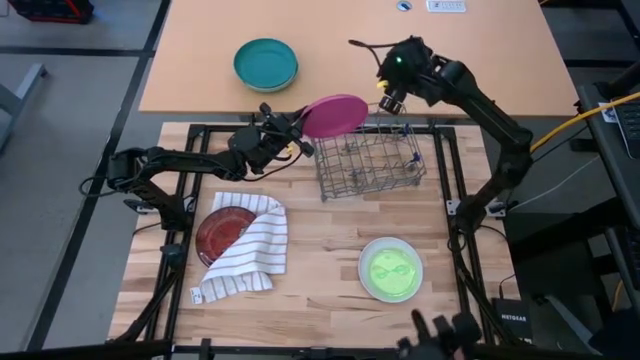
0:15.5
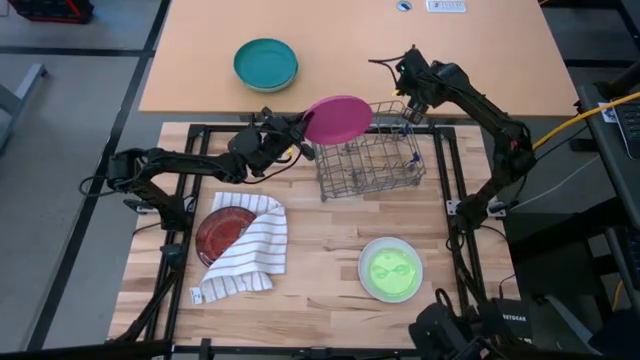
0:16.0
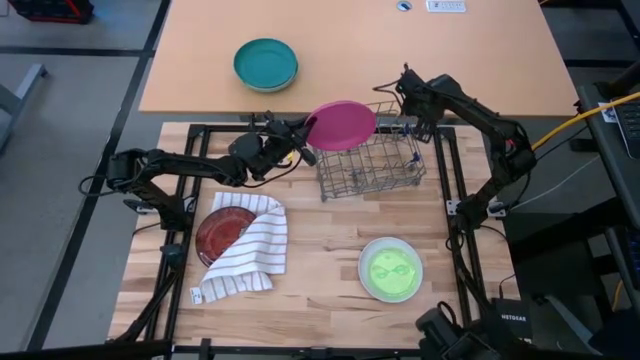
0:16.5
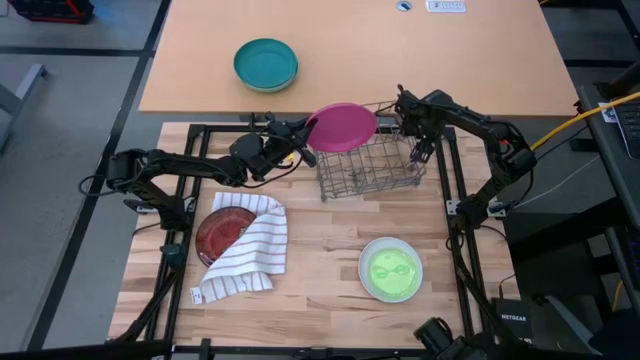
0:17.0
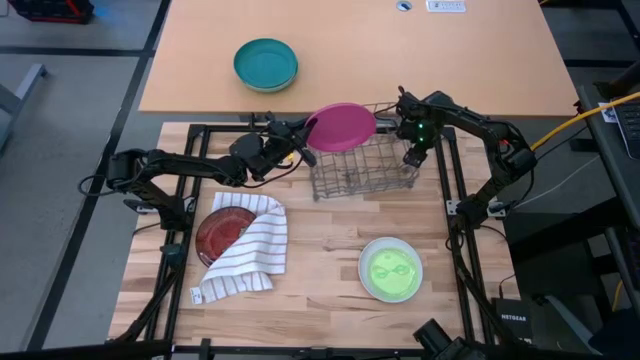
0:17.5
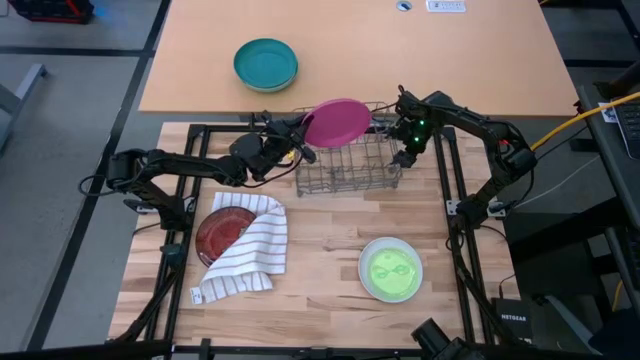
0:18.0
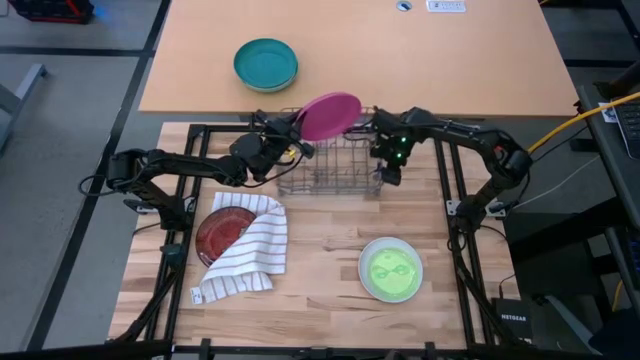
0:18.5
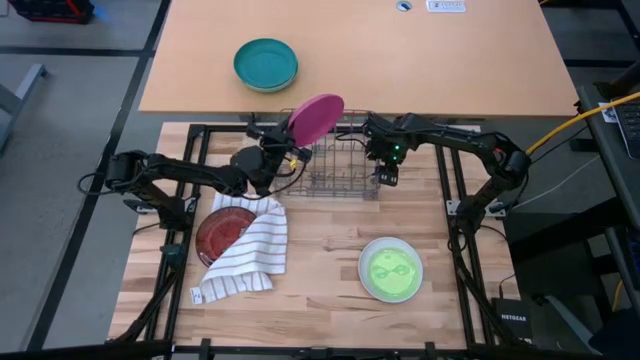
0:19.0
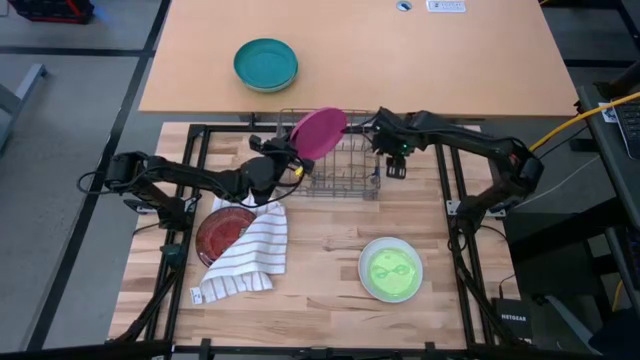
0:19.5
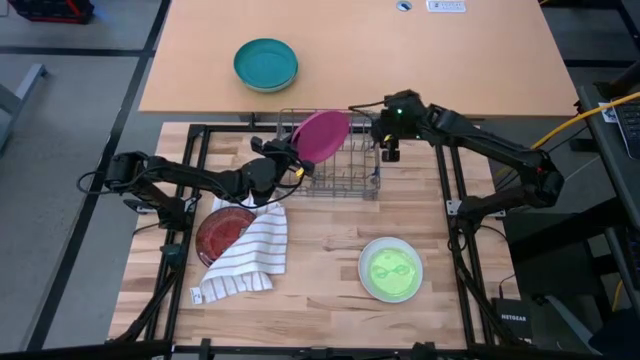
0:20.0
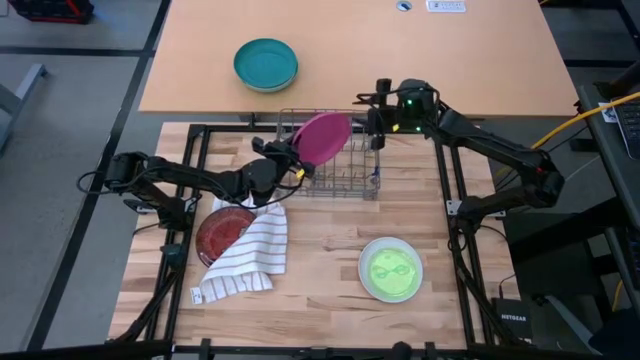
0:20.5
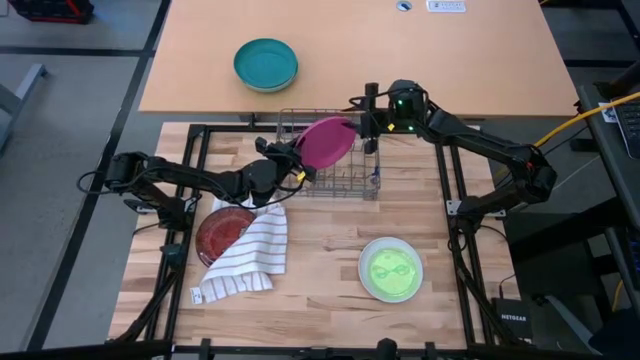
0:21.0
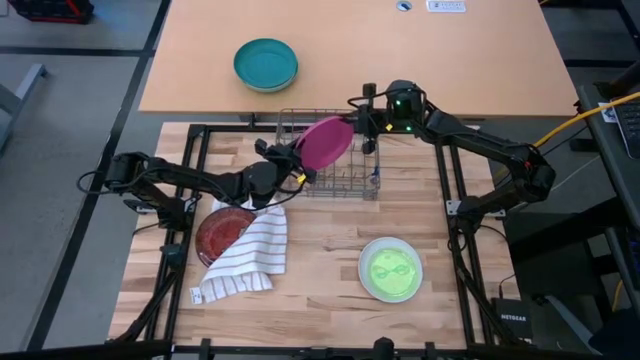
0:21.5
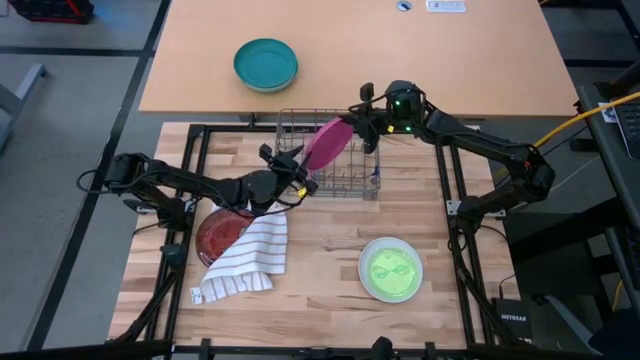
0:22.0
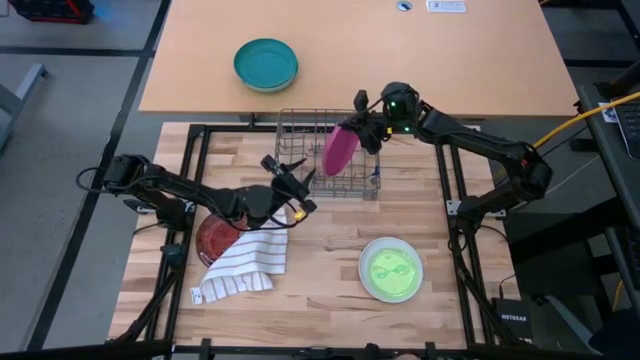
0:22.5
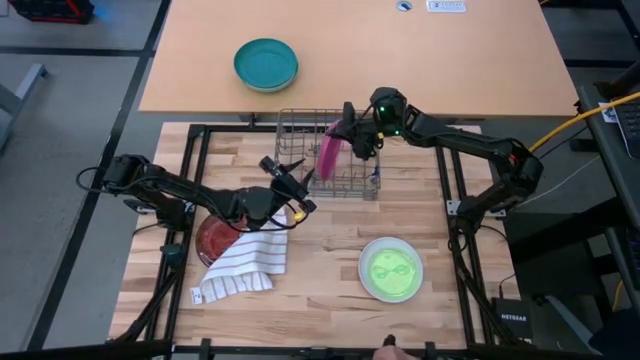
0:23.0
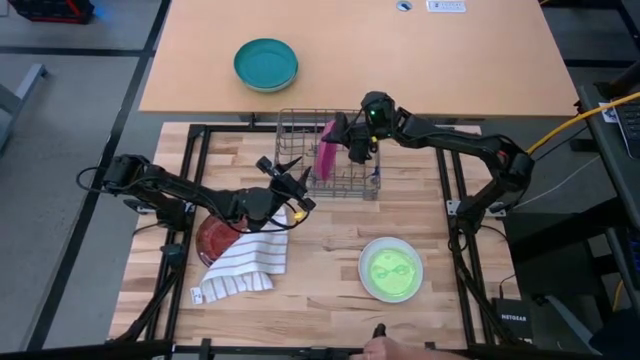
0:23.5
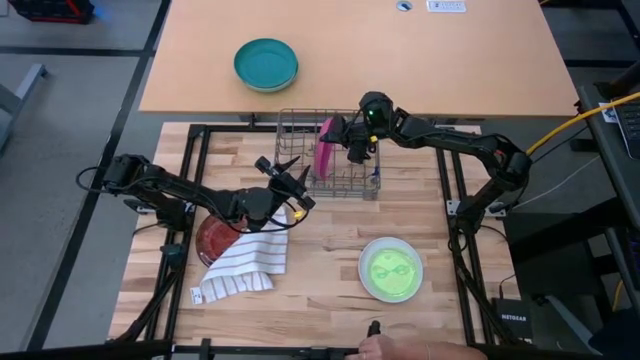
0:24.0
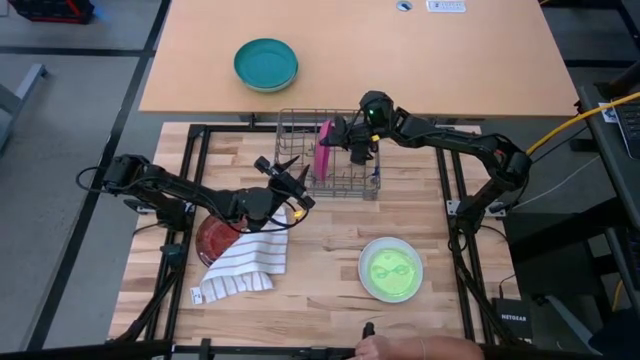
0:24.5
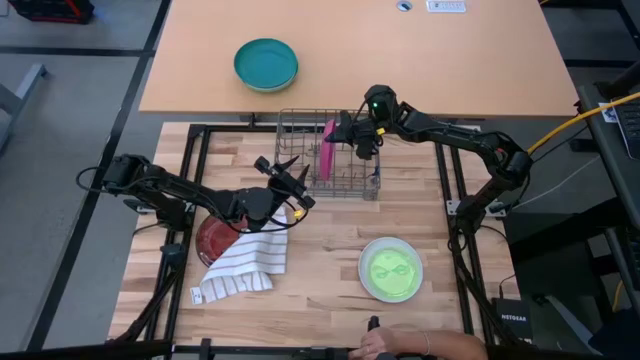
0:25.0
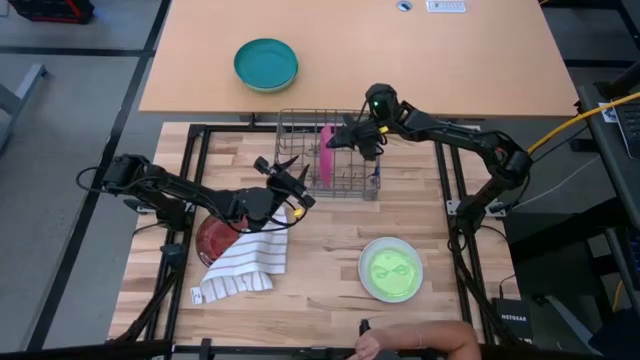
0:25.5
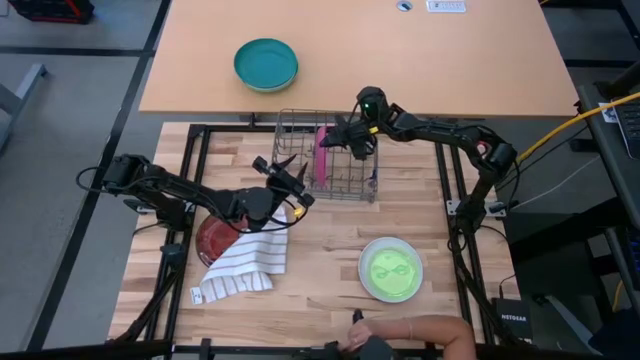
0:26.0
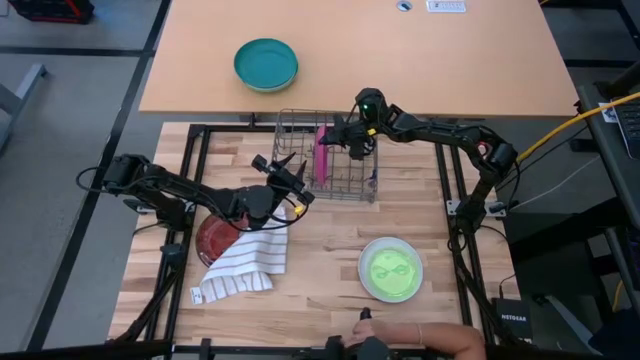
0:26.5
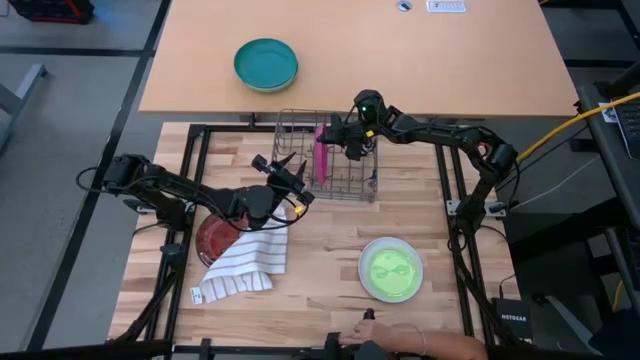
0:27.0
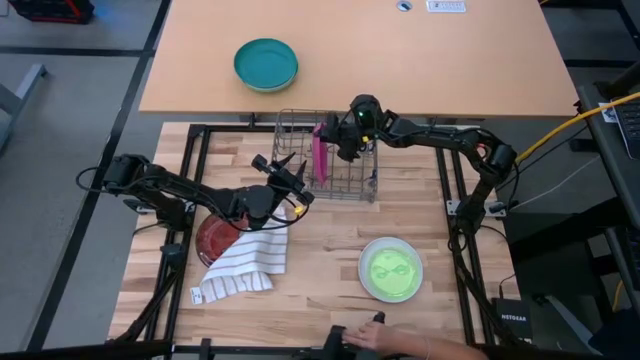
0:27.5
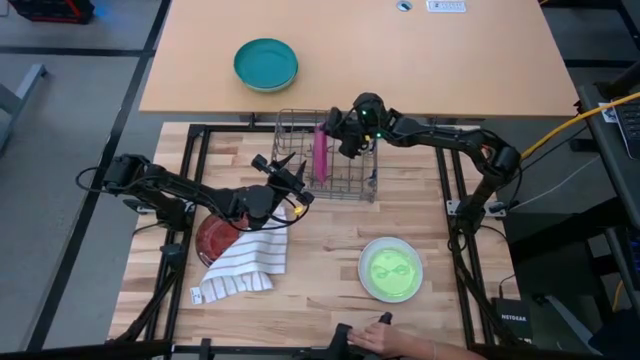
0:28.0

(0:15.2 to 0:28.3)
Task: Sort dishes
Put the pink plate in the dish rack

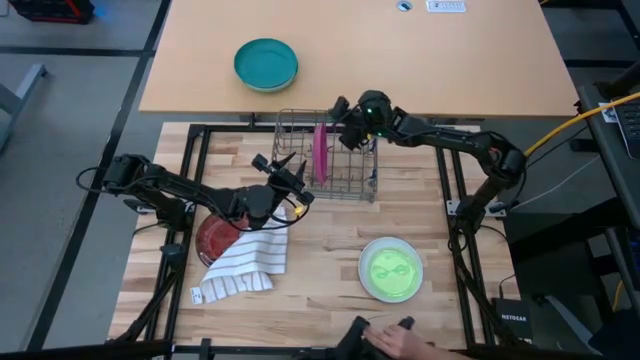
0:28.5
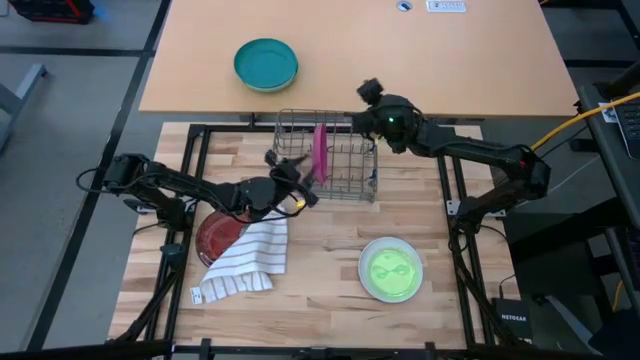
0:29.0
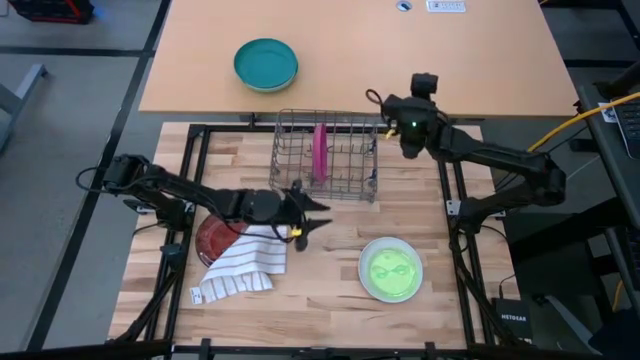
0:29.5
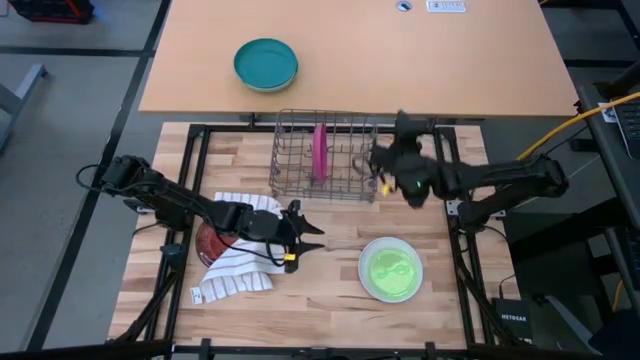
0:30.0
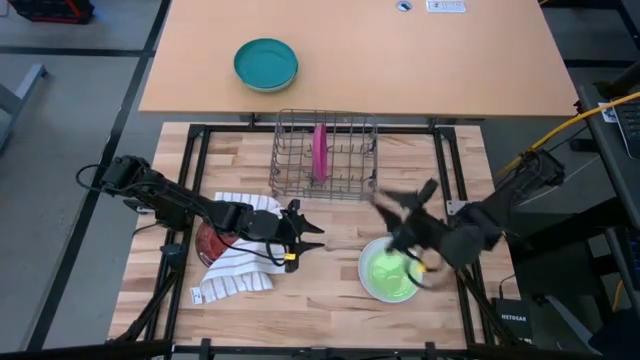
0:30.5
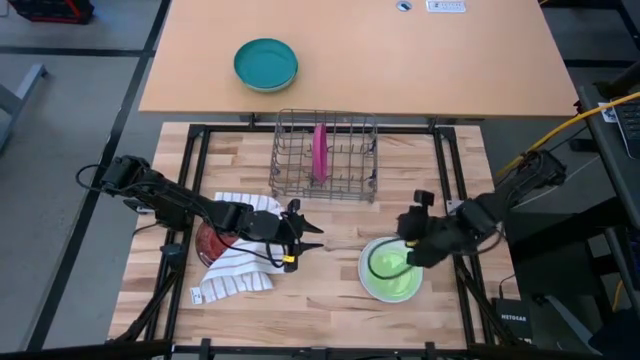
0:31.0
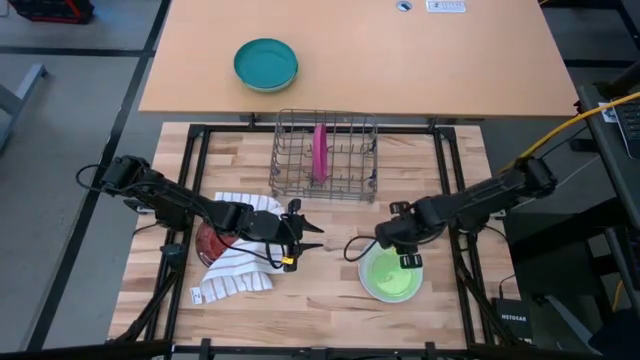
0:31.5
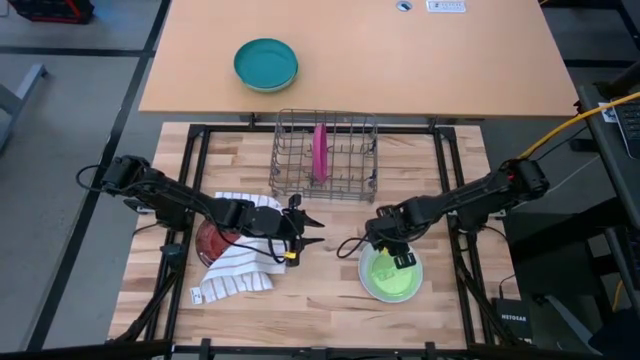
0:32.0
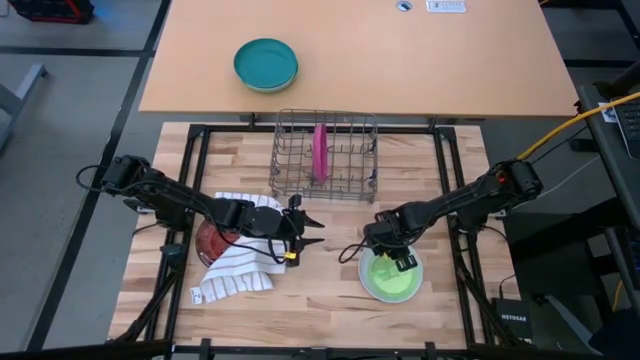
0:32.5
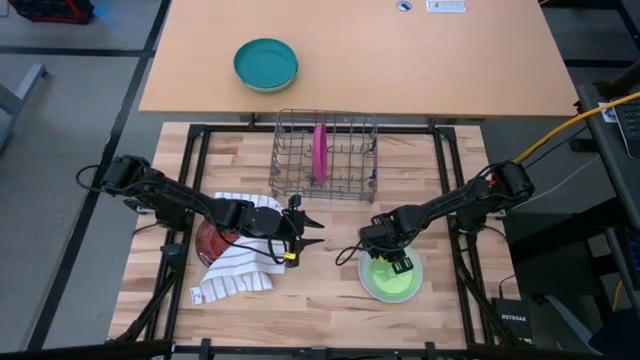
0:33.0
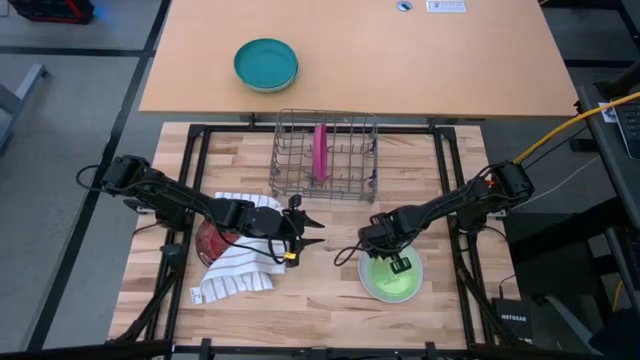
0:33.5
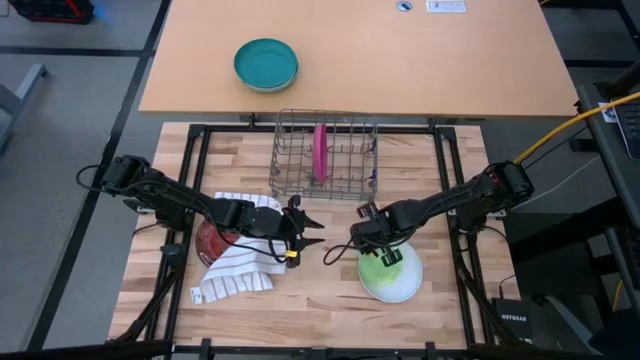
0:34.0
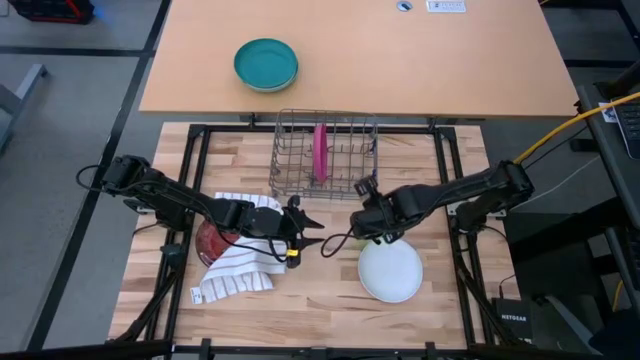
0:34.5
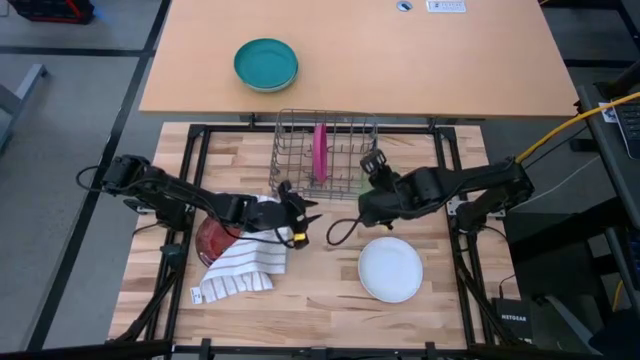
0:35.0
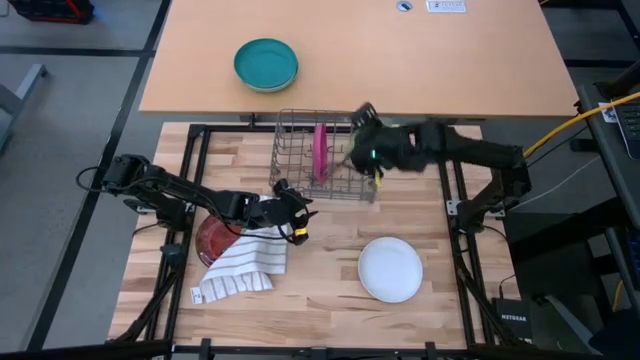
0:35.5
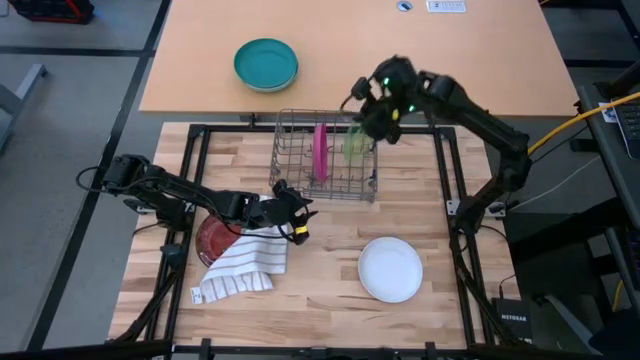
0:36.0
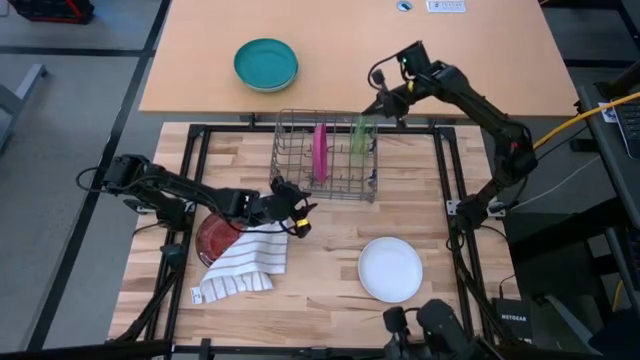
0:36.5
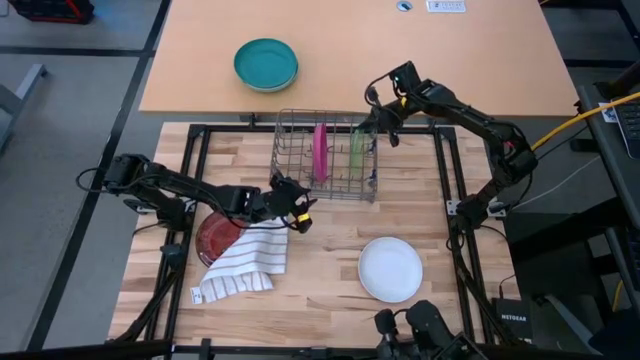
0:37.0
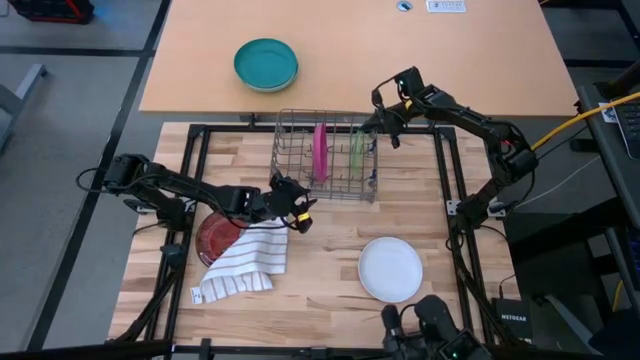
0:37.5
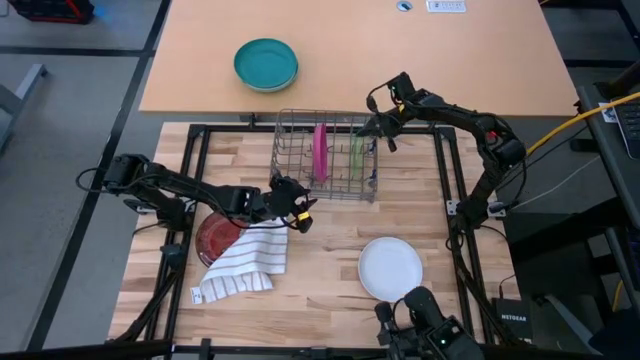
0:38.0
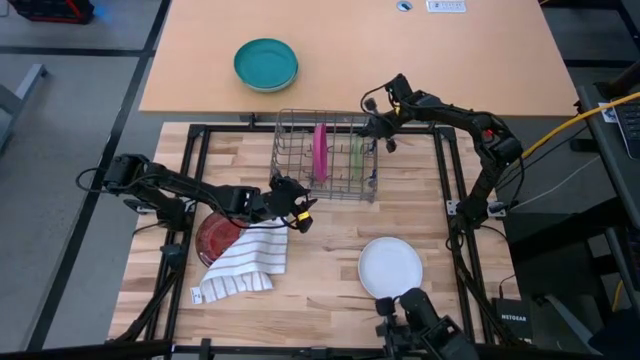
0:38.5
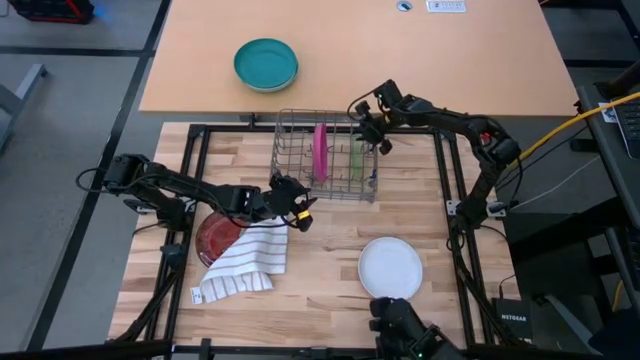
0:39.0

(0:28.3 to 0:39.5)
Put the transparent green plate in the dish rack
